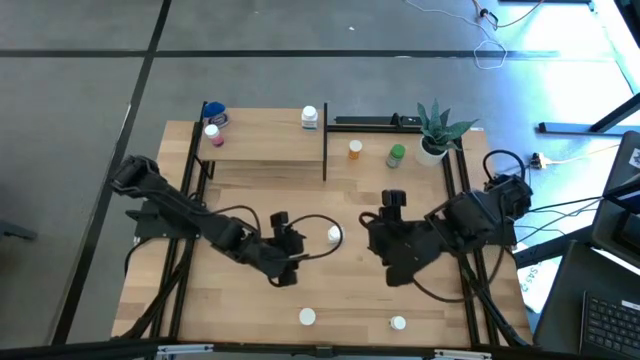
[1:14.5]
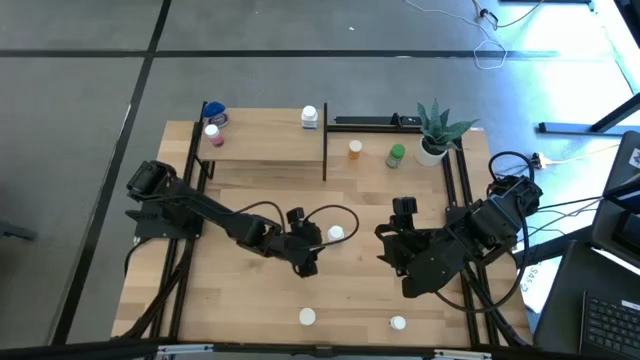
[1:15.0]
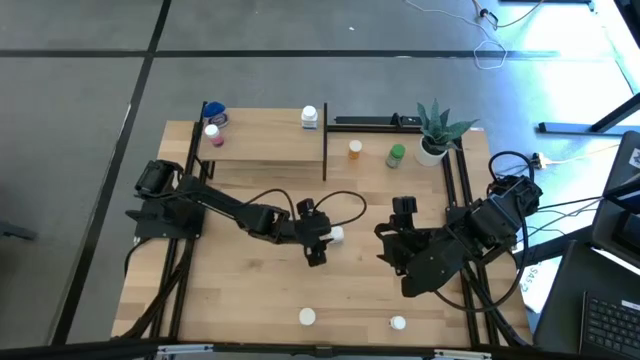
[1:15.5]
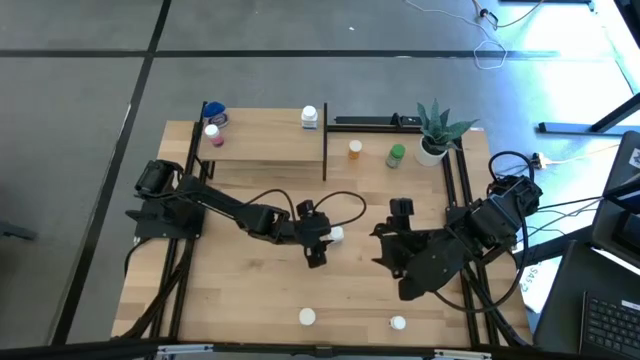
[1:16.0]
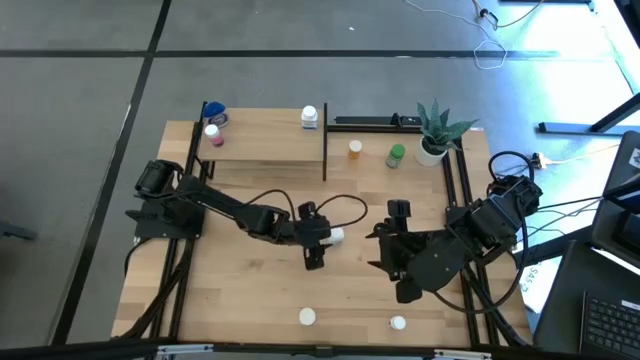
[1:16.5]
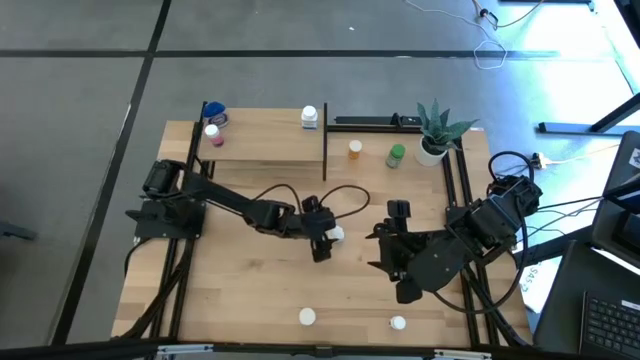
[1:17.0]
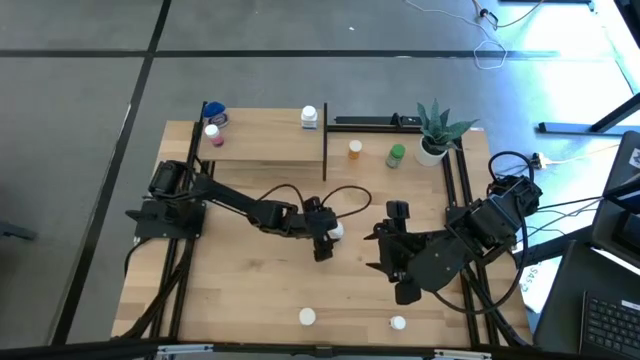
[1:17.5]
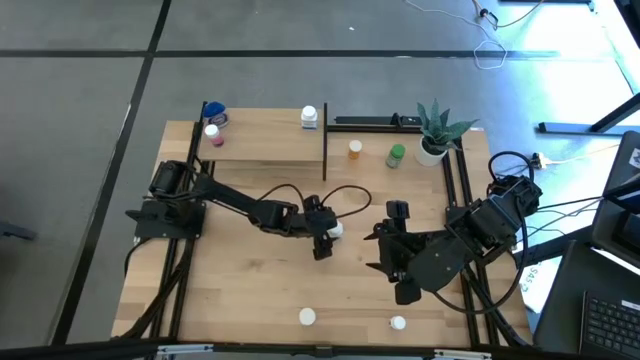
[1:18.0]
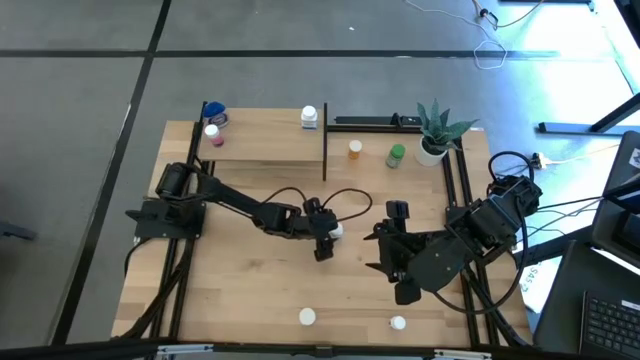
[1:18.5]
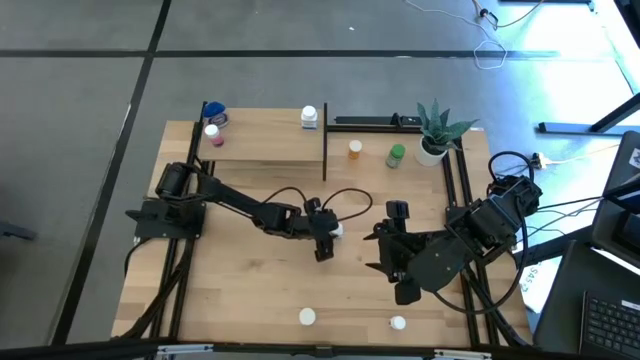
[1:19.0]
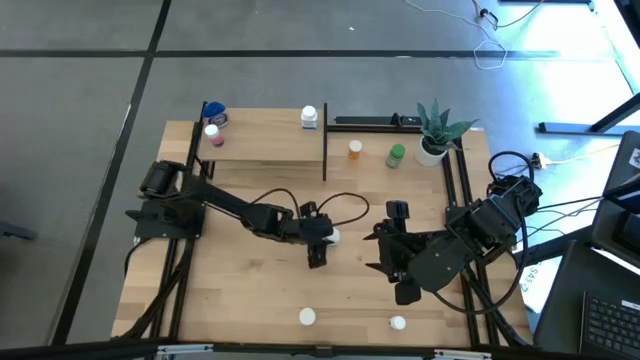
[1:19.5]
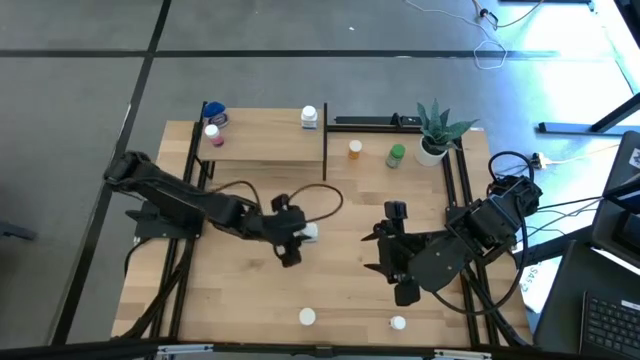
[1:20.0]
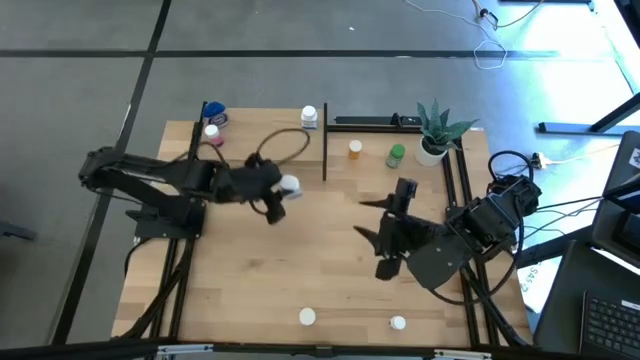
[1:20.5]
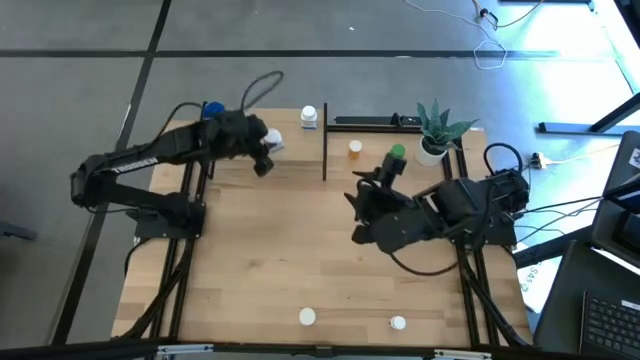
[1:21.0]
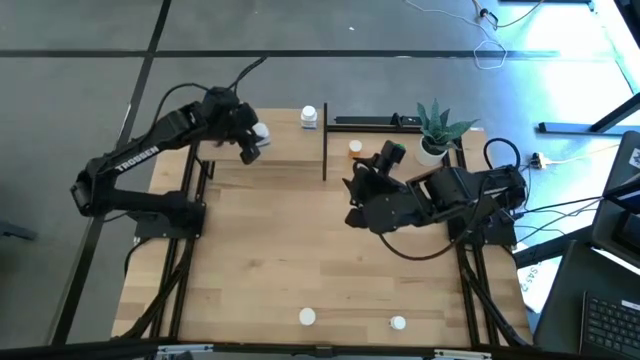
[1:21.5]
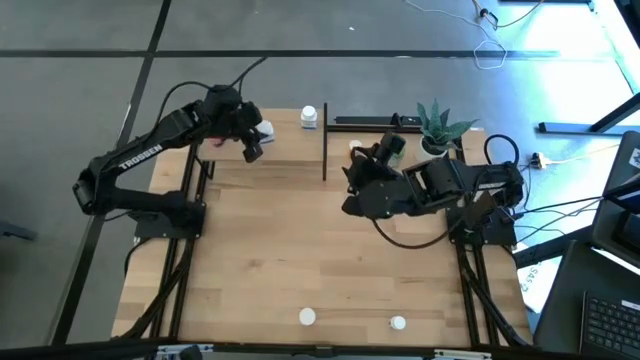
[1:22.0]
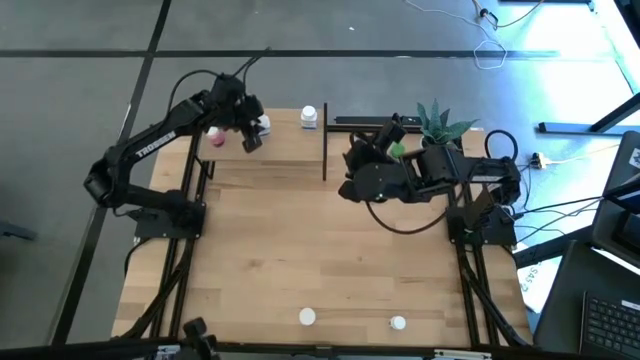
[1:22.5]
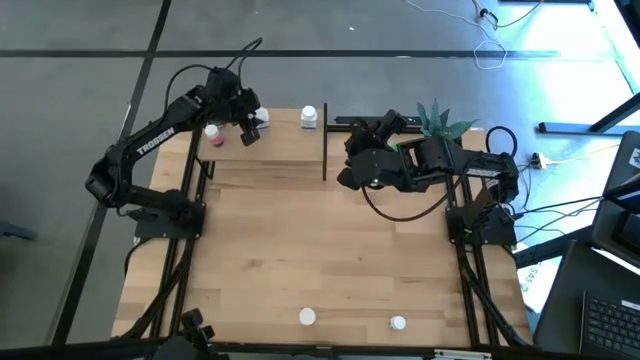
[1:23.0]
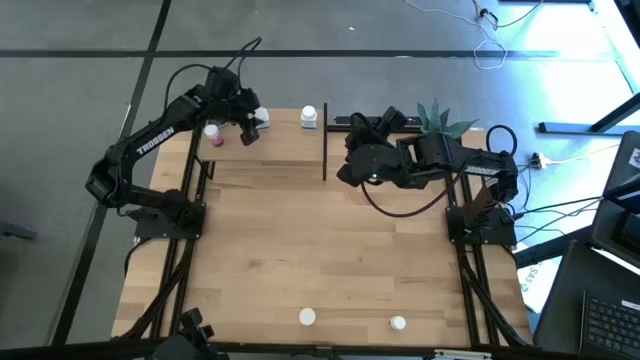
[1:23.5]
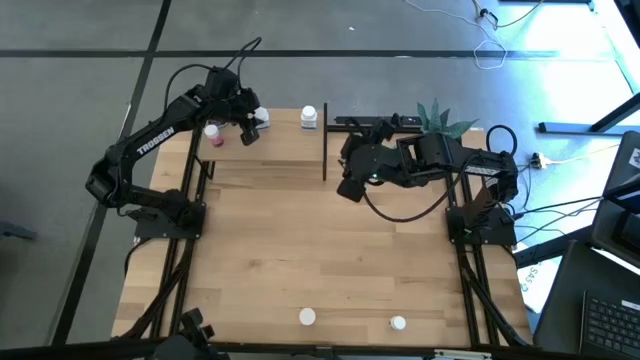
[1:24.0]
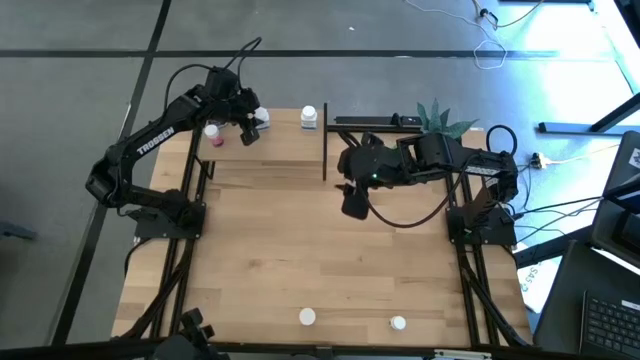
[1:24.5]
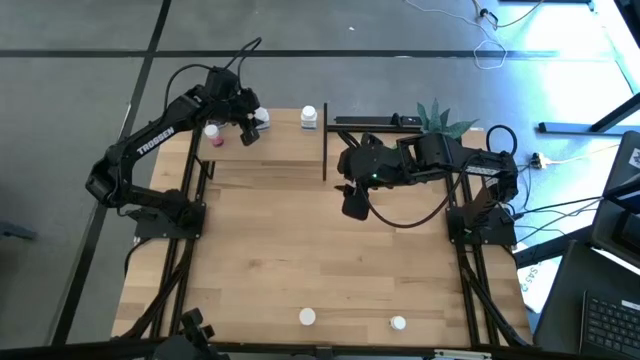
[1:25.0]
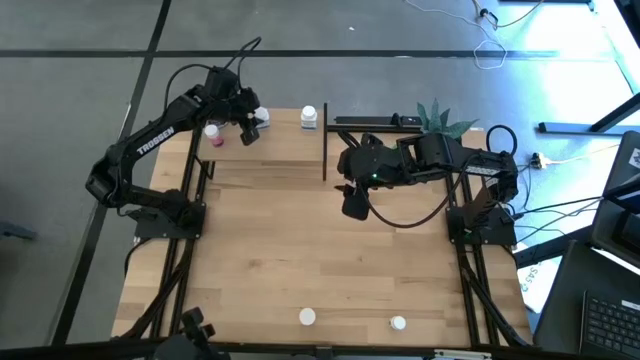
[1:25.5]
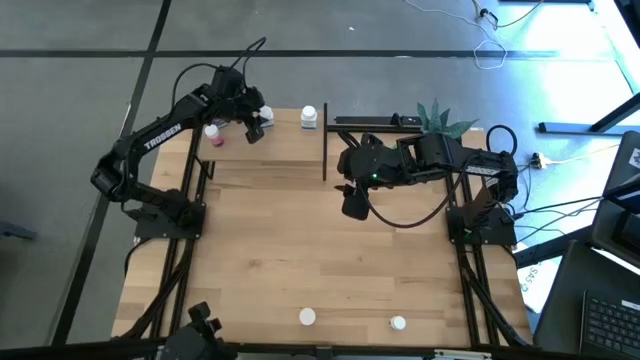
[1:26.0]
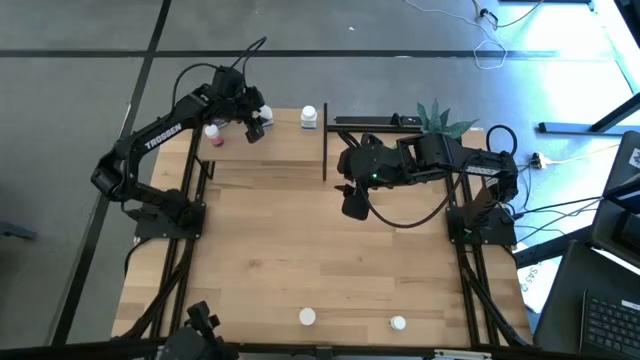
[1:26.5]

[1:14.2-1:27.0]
Task: Pick and place medicine bottles onto shelf by color
Put the white pill bottle on the shelf

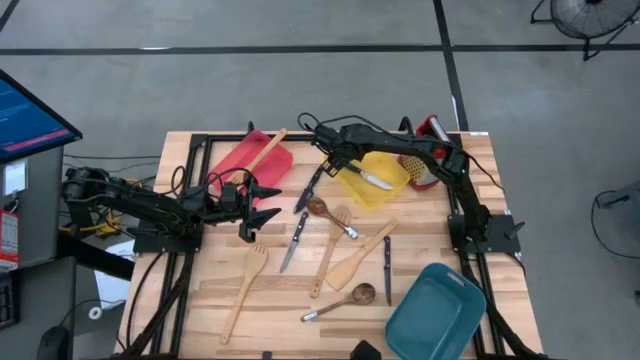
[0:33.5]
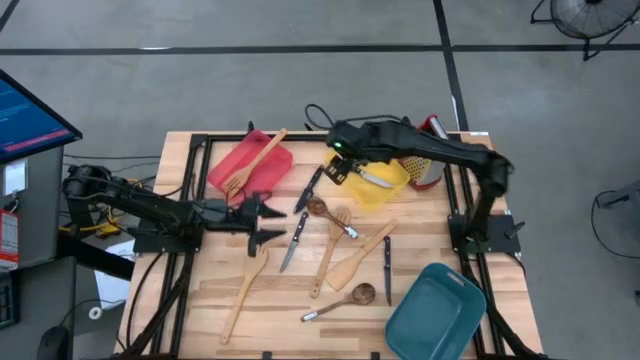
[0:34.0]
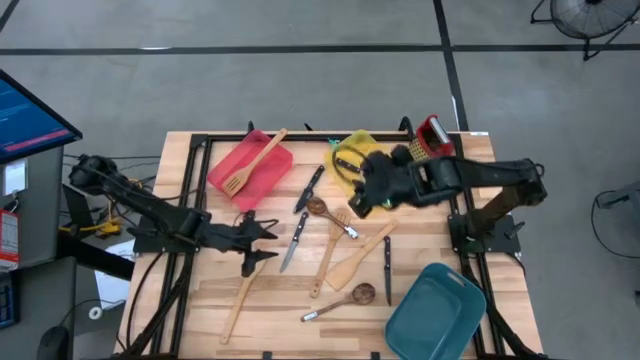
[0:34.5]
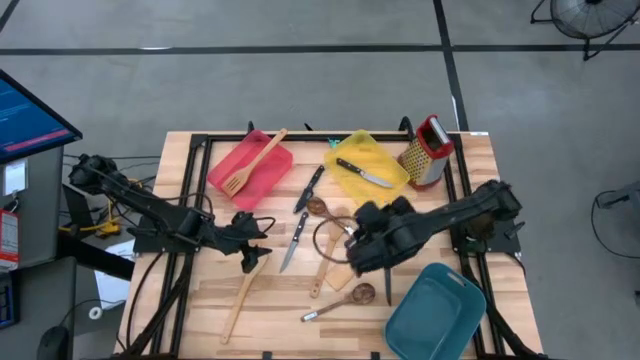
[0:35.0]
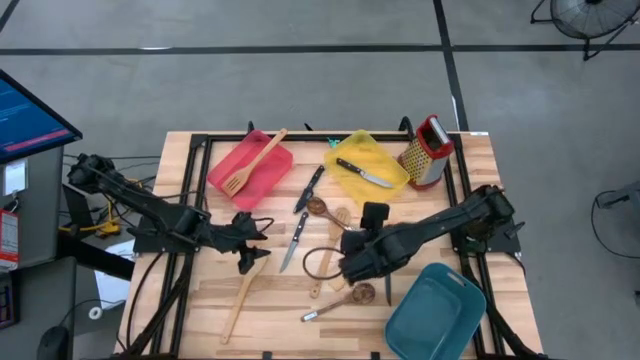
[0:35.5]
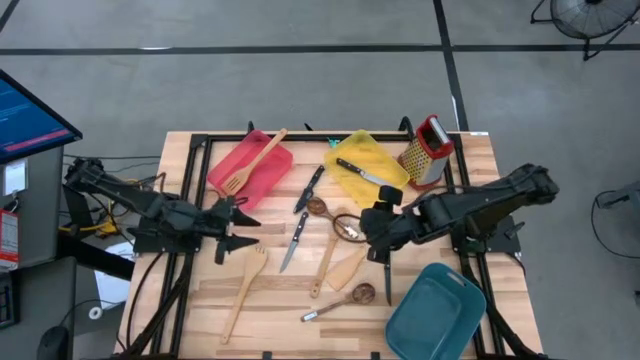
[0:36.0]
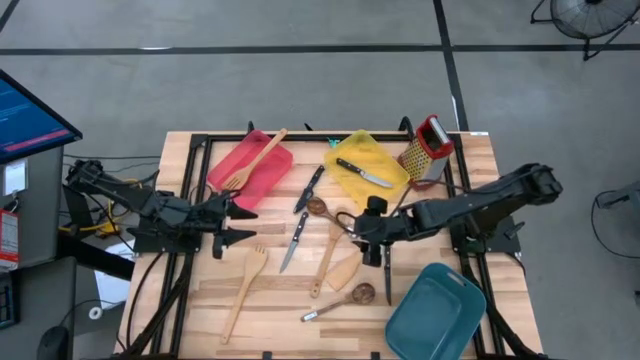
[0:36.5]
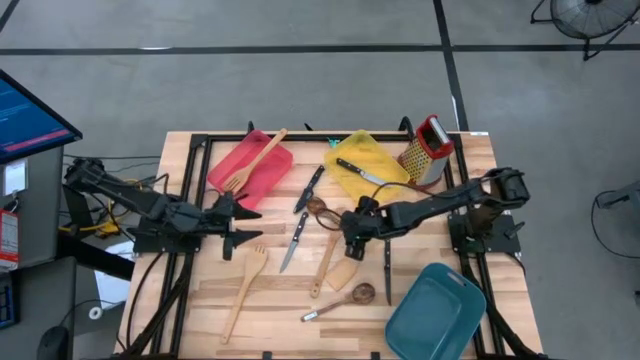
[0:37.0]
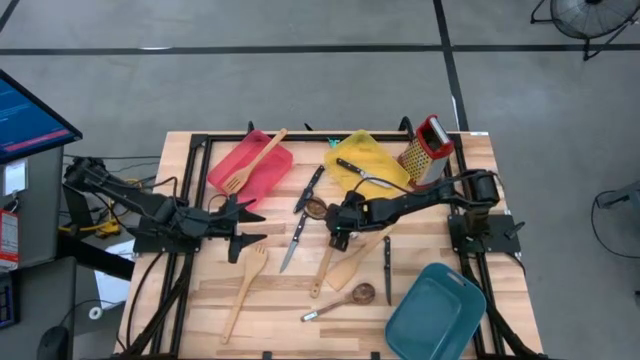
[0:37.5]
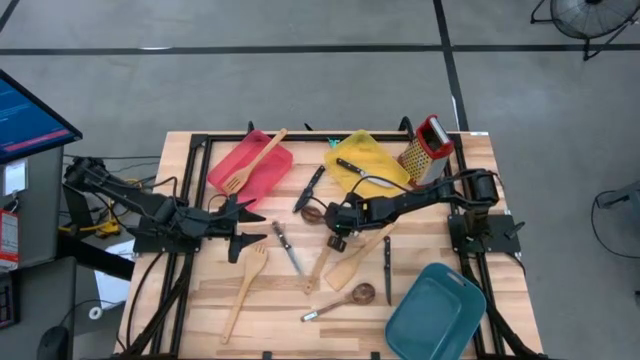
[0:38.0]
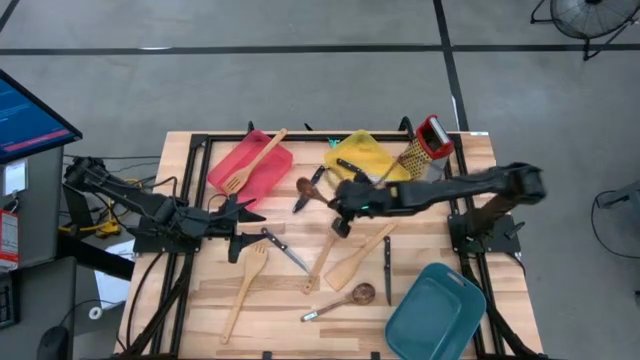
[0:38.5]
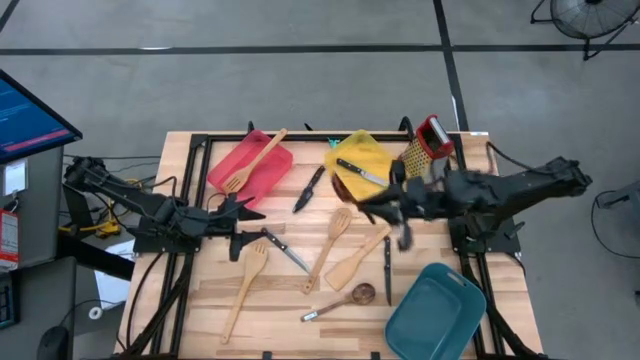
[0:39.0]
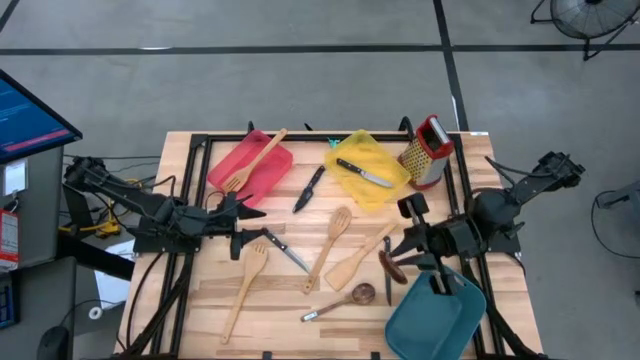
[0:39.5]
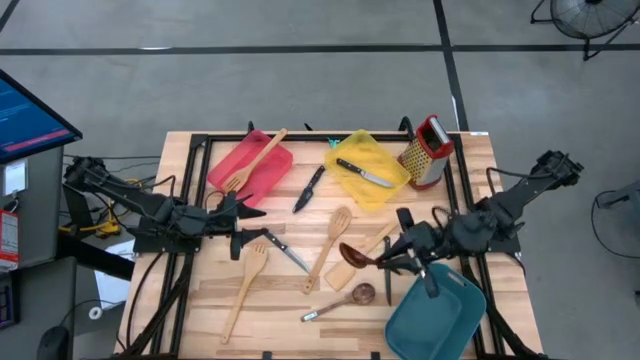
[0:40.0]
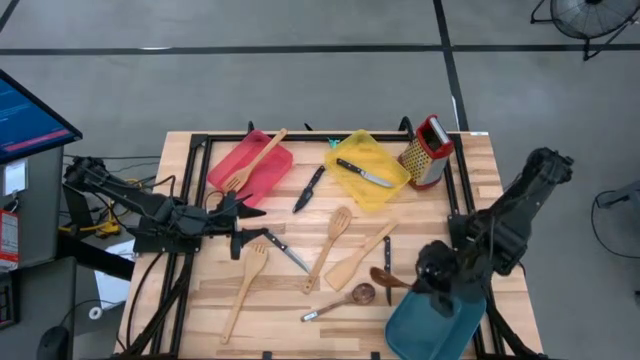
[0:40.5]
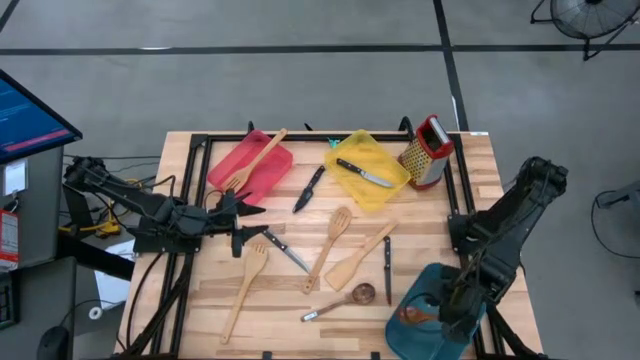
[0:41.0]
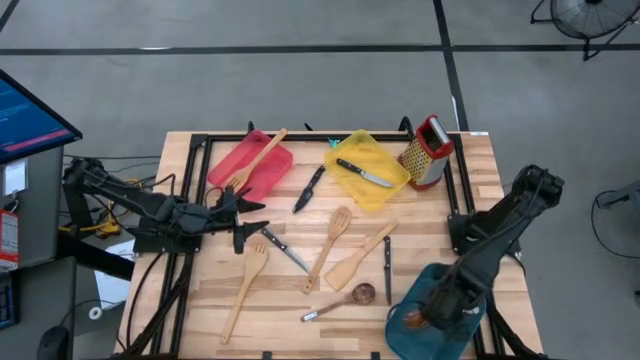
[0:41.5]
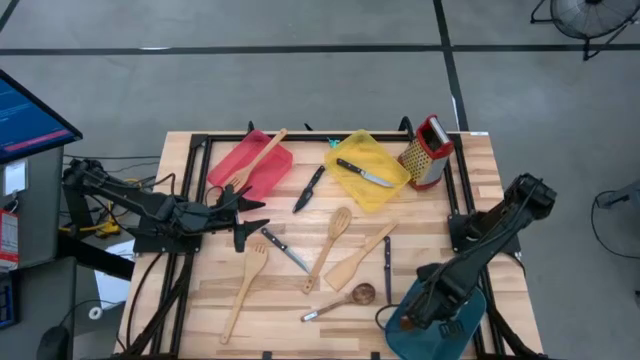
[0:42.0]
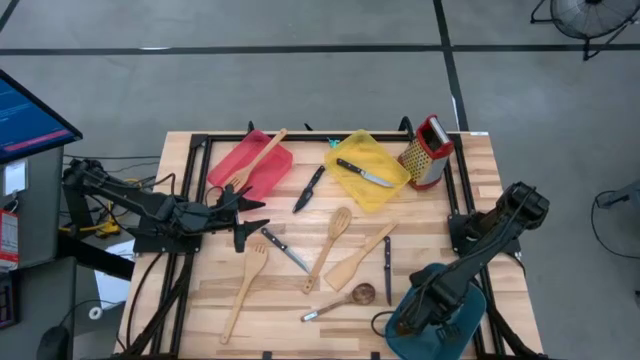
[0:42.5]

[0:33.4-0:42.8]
Task: Pick & Place Kitchen Items
Put the top wooden serving spoon into the blue bin
